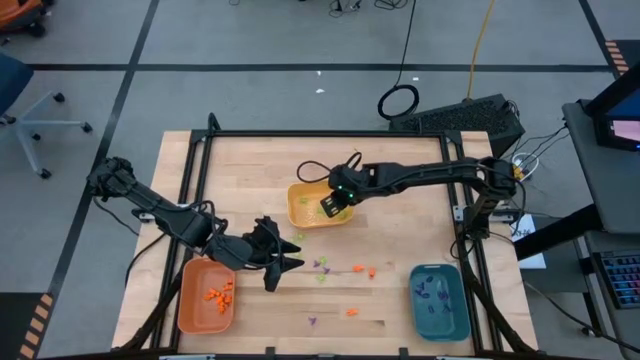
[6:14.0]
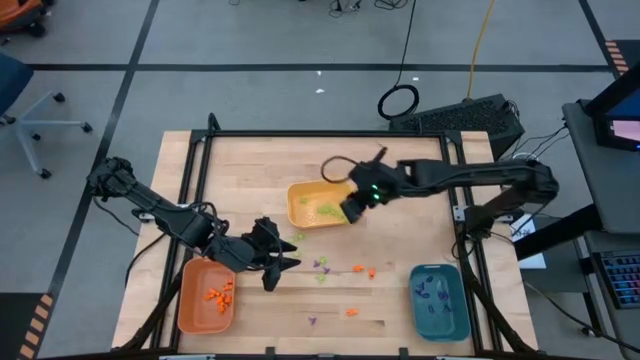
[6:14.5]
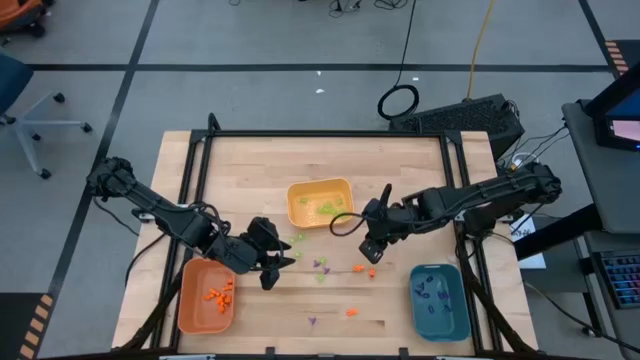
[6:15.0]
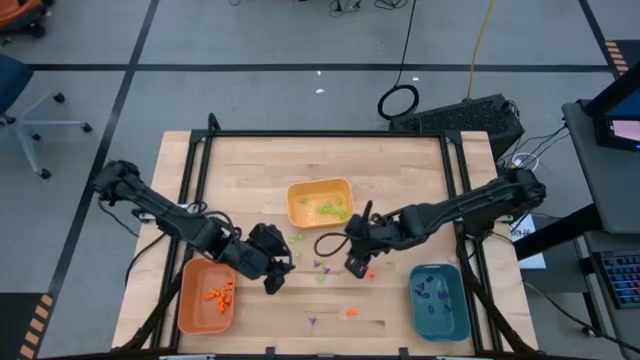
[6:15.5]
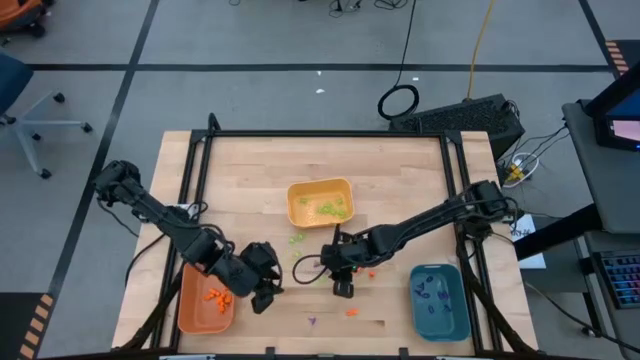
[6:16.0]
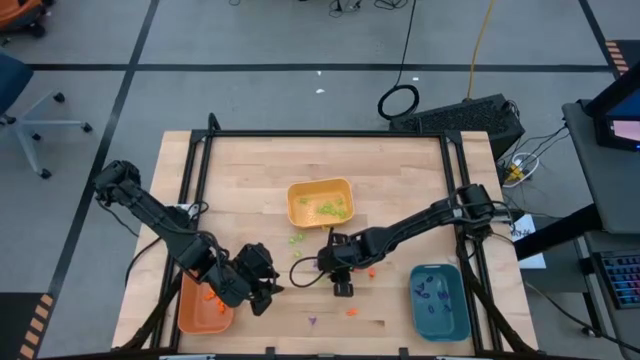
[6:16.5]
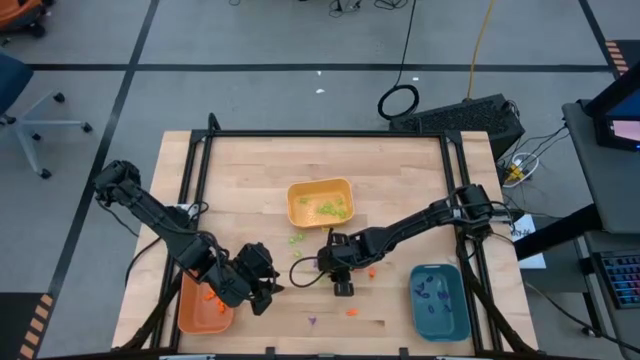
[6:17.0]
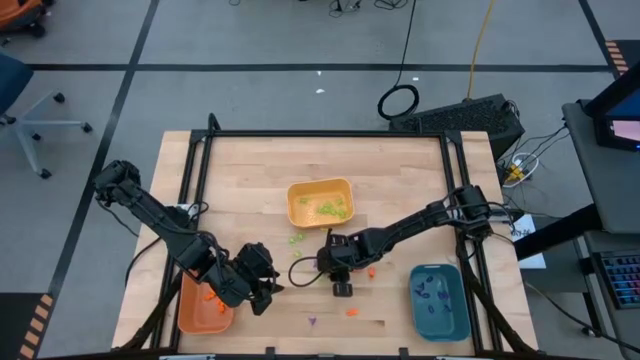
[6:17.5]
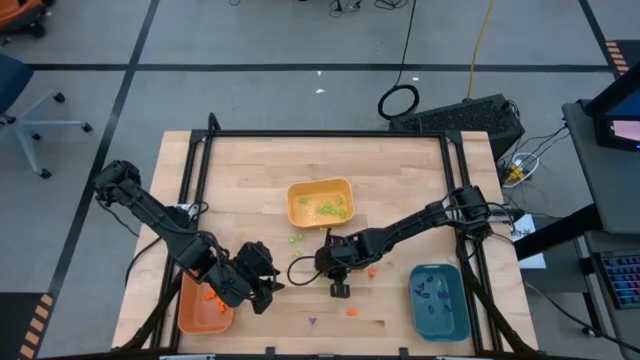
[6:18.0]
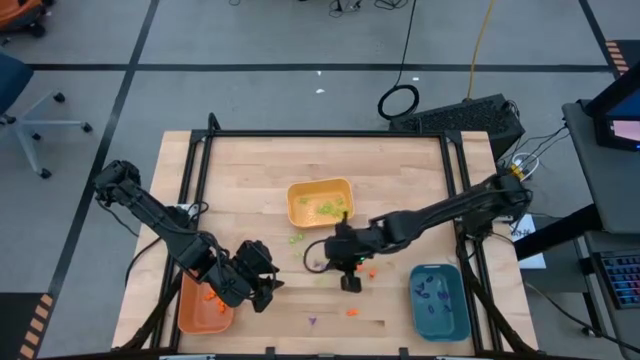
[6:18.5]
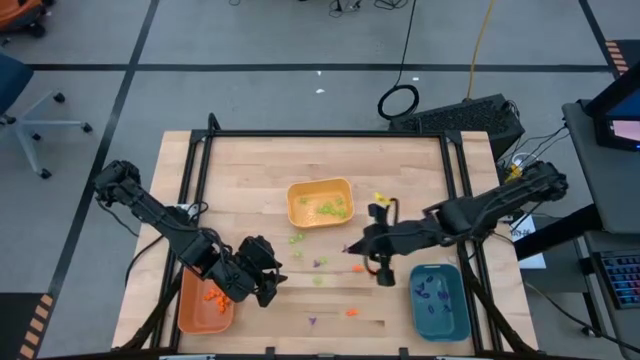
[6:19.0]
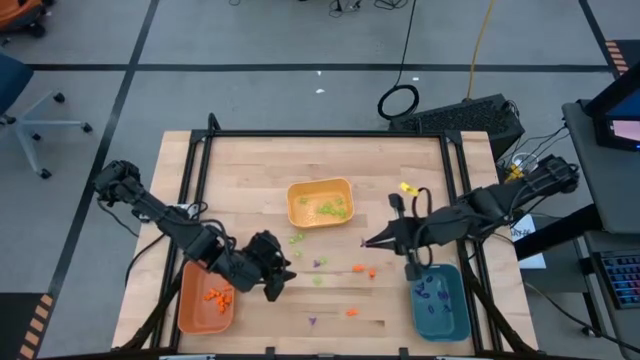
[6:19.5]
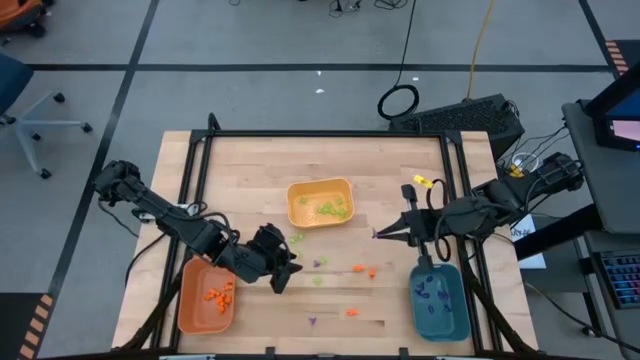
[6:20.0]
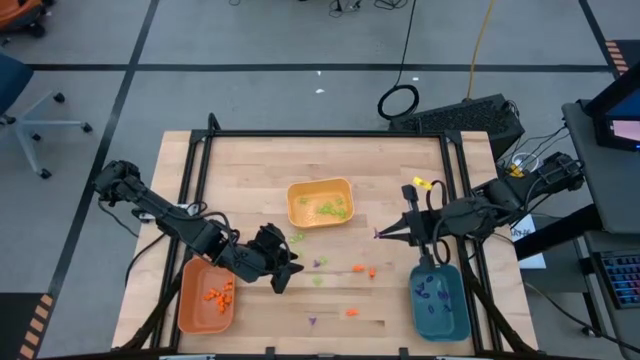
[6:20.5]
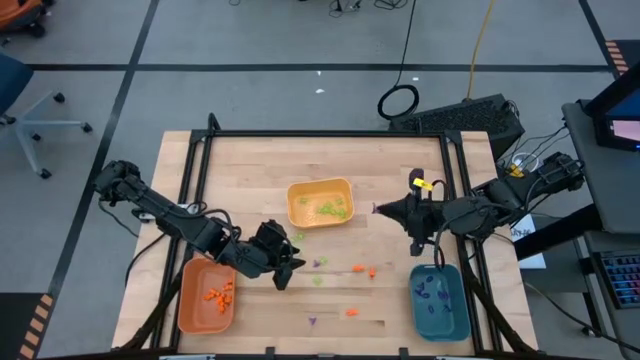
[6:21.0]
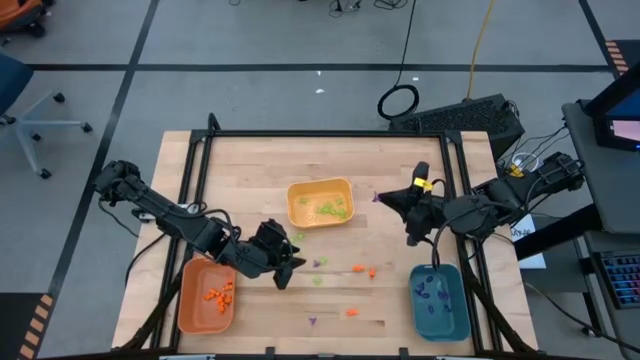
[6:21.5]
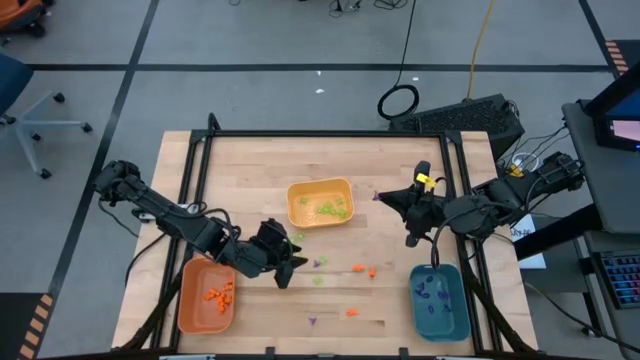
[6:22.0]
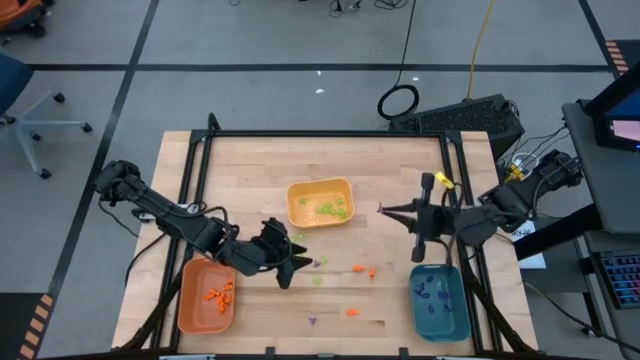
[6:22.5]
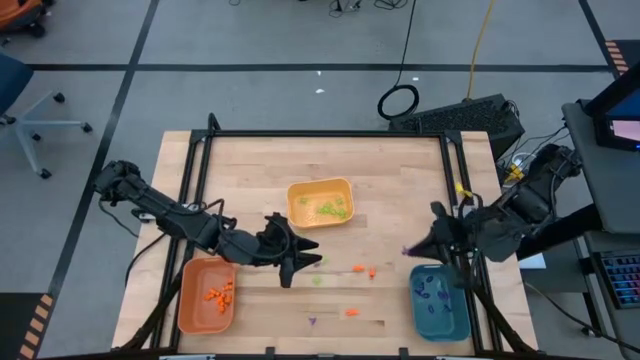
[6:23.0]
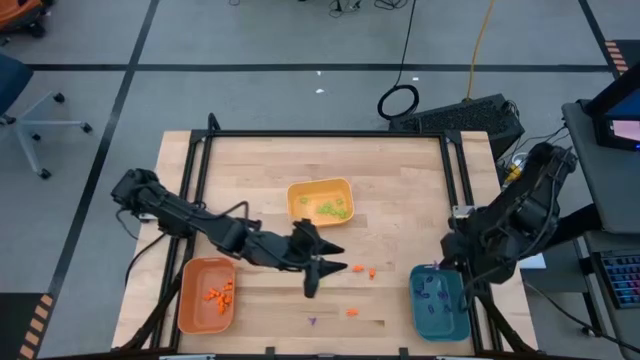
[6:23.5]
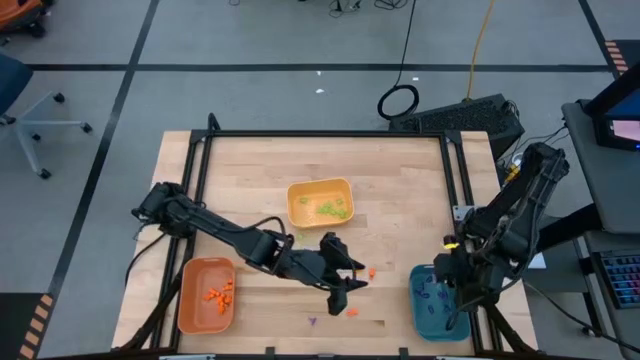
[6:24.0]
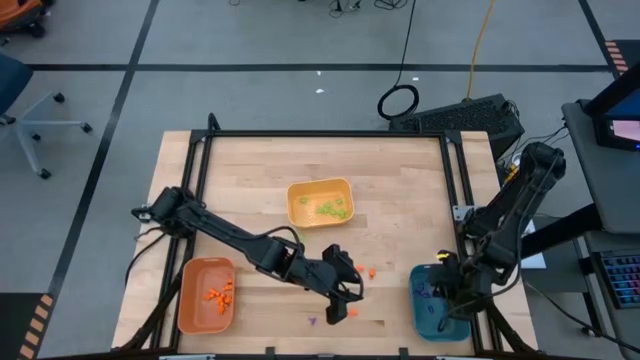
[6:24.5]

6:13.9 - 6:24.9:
Task: Sort Halloween decoration
Put the violet witch hat toy into the blue bin

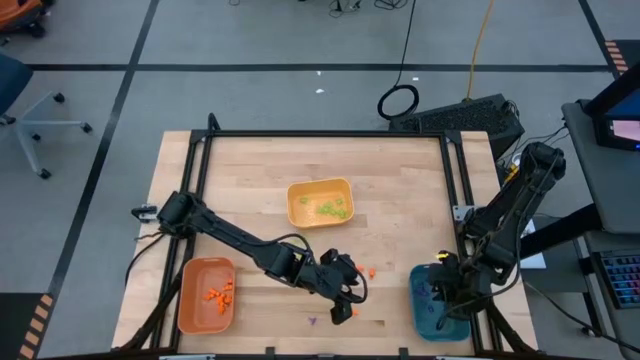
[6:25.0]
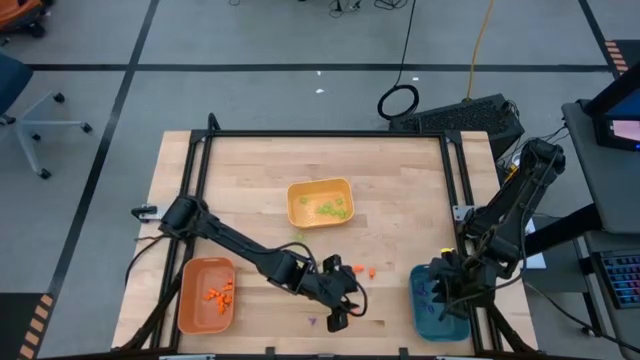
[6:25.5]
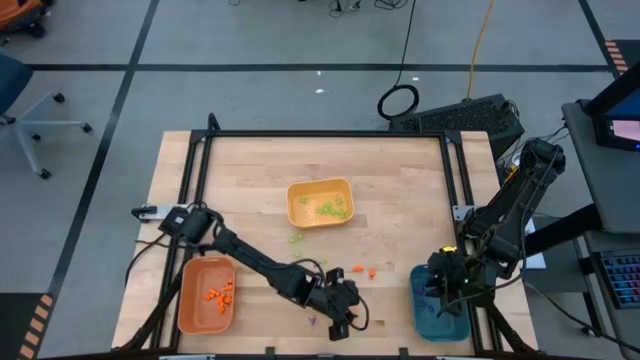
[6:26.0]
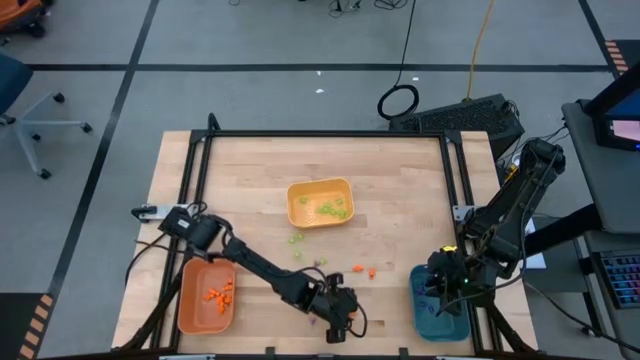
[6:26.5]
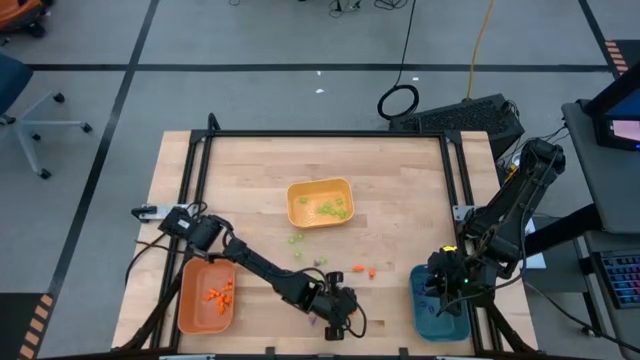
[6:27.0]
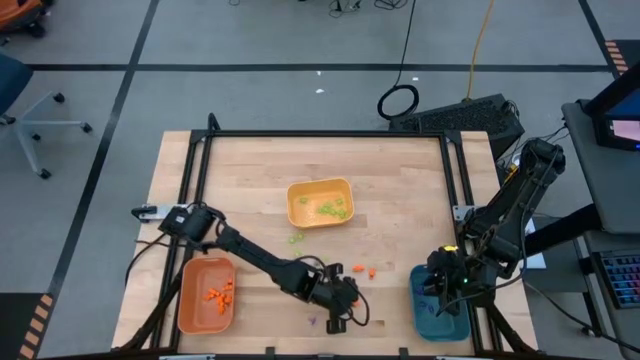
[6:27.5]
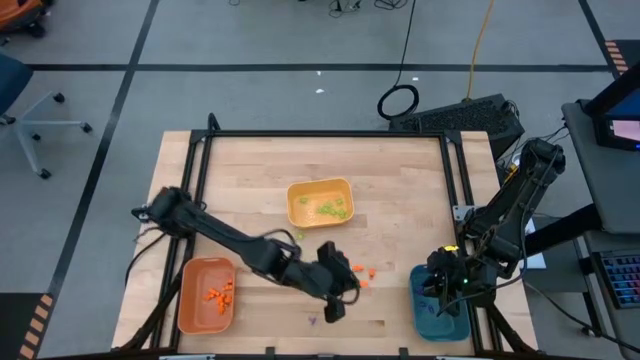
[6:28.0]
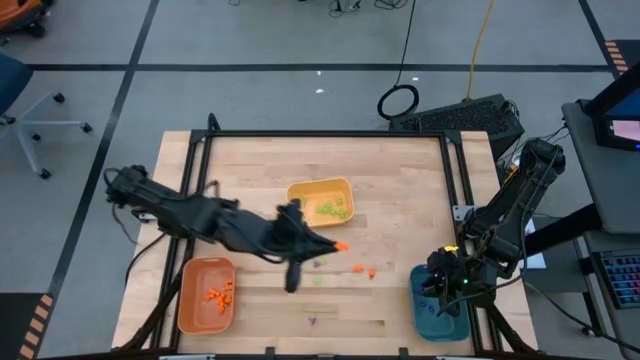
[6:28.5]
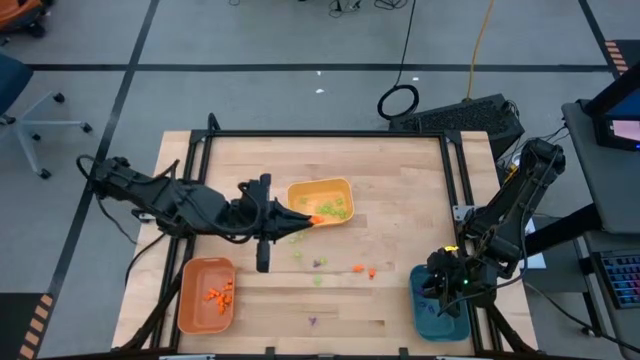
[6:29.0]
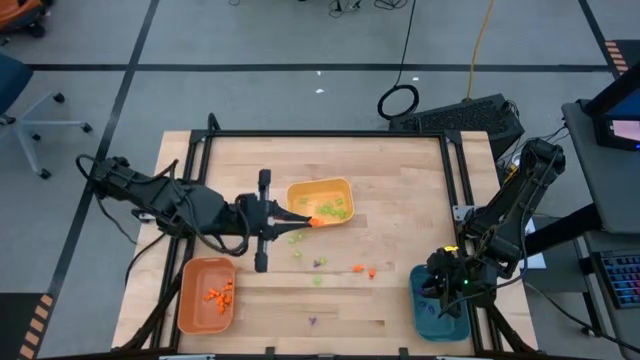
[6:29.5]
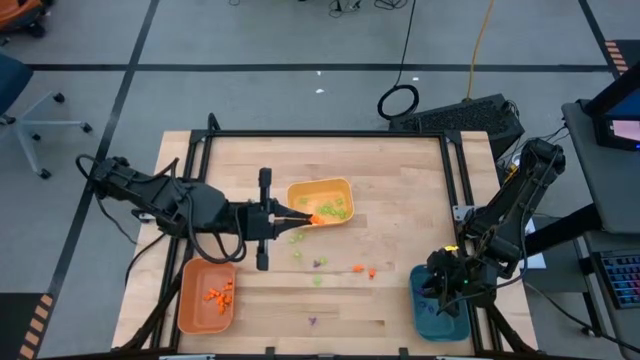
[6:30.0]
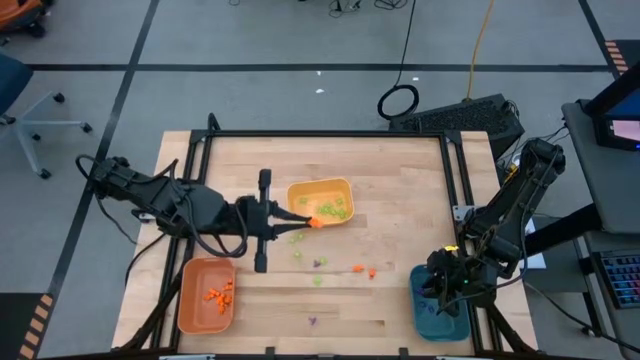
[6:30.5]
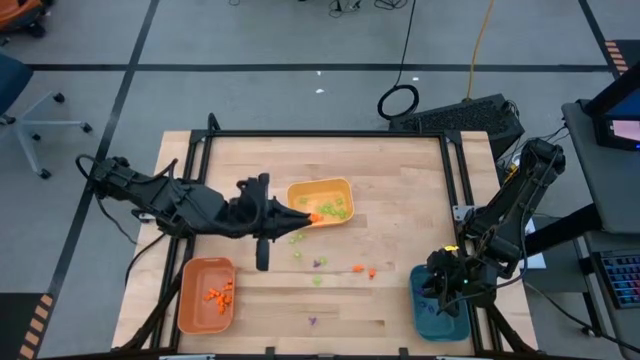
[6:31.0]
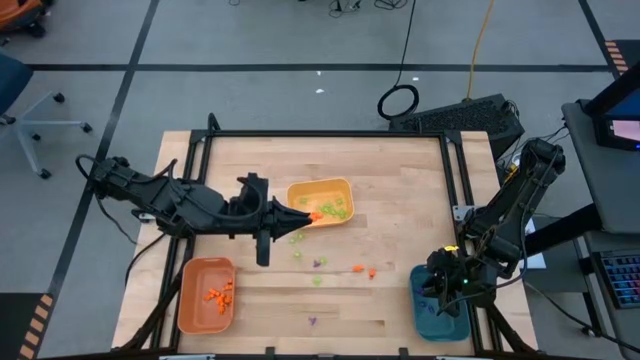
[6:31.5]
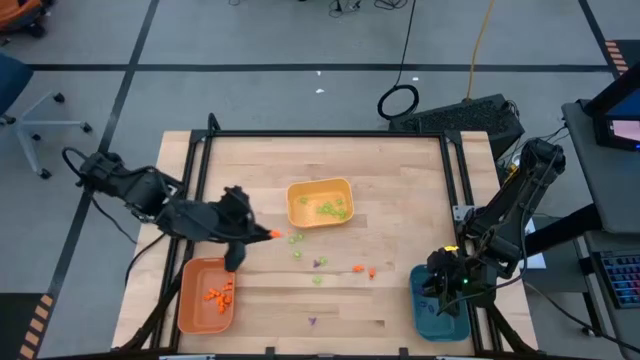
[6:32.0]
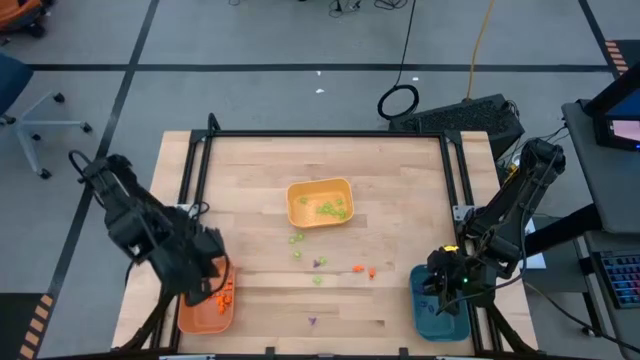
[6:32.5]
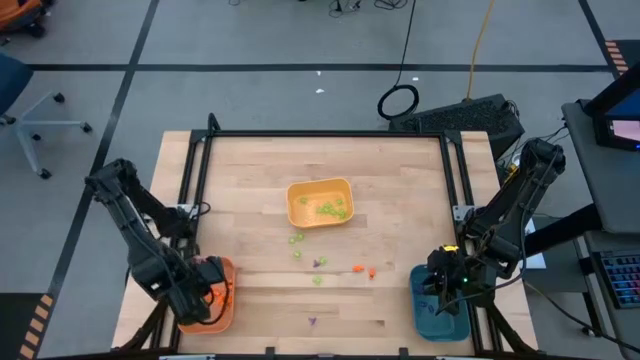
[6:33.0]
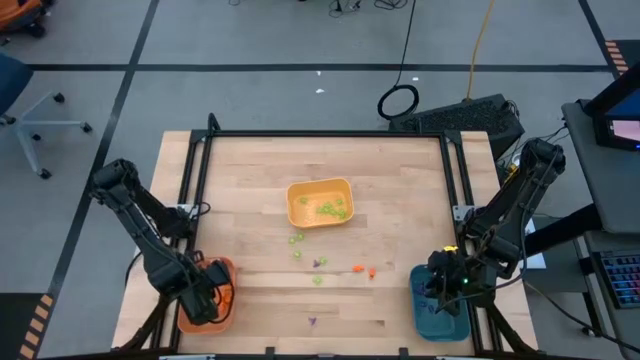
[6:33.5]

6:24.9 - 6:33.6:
Put the orange skeleton toy into the orange bin

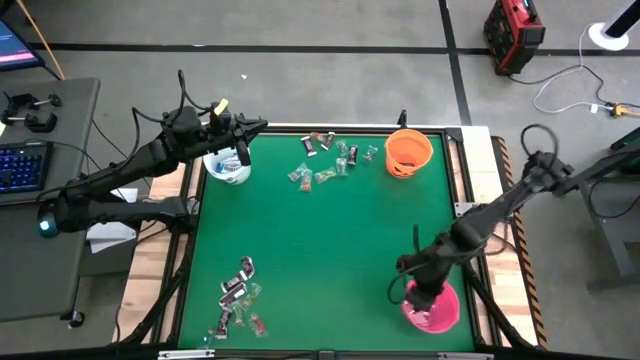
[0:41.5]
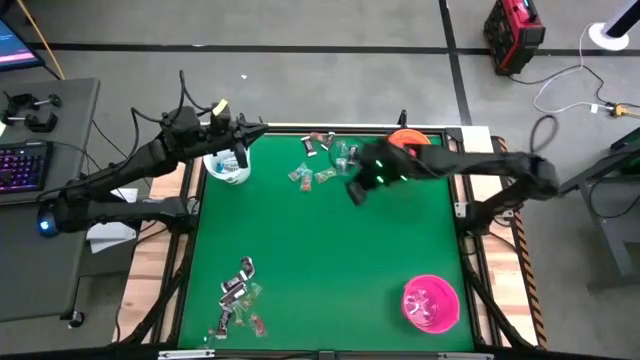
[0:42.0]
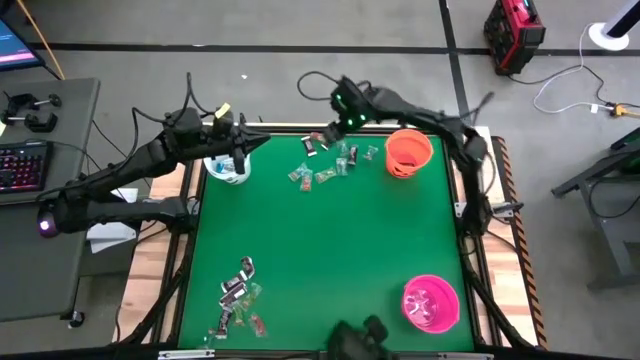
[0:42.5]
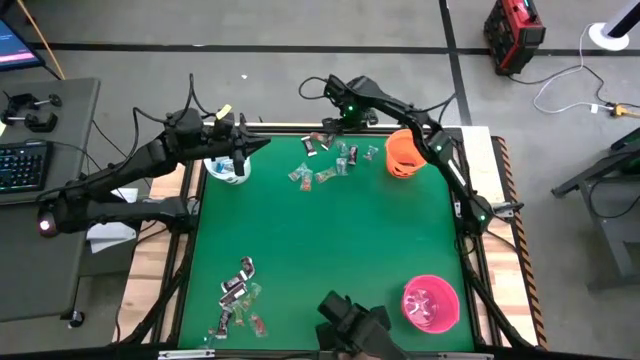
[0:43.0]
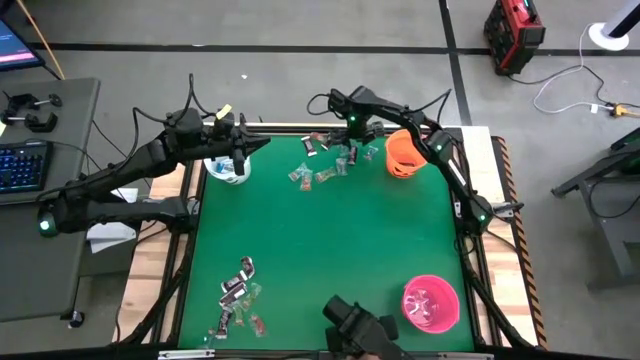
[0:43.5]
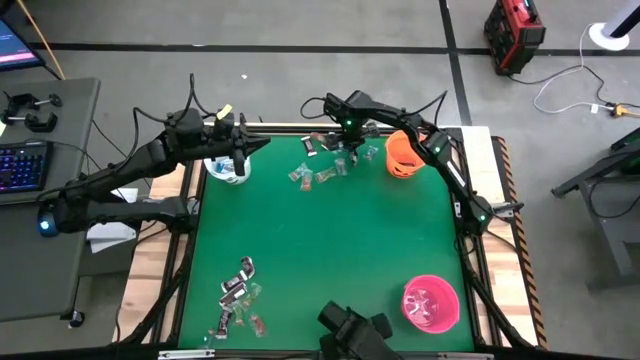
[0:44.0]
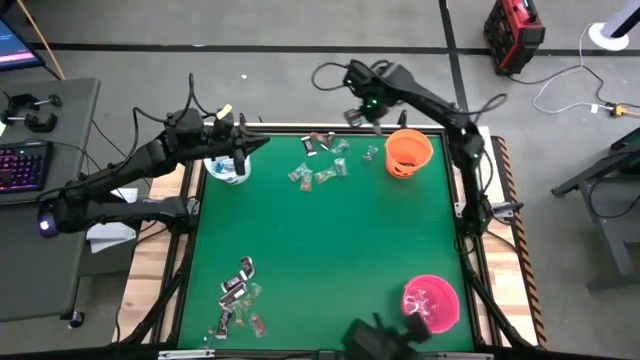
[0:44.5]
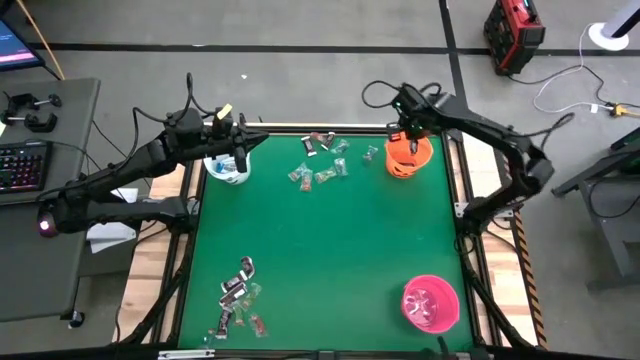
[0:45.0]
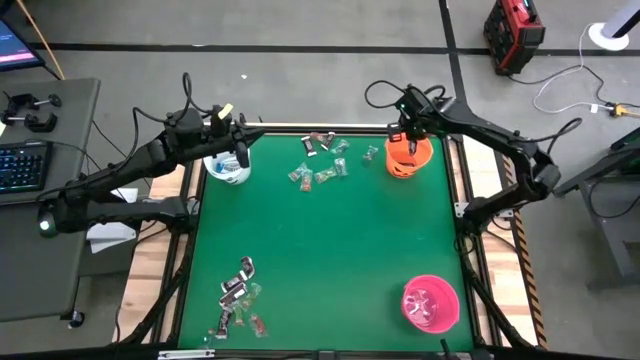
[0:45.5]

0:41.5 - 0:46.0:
Task: Sort candy by brand, put in halloween buckets
Put the brown chocolate bar into the orange bucket
